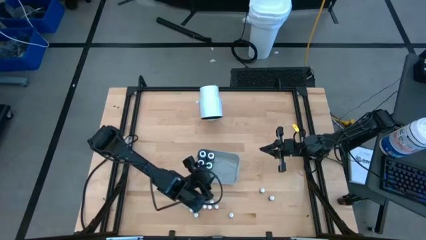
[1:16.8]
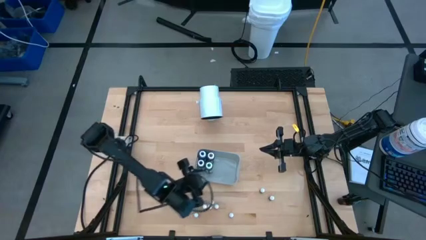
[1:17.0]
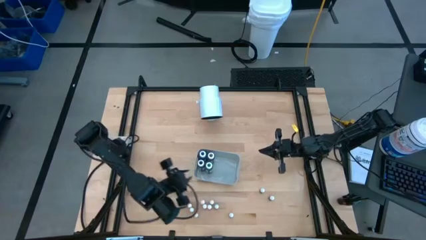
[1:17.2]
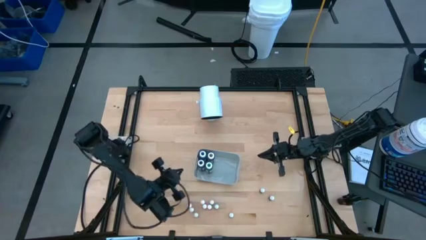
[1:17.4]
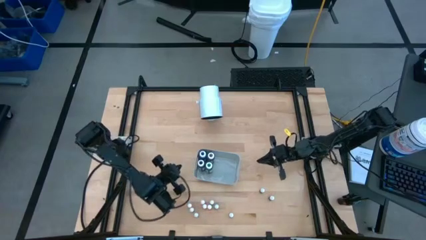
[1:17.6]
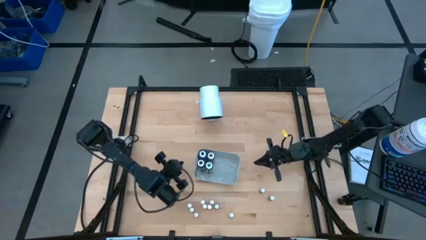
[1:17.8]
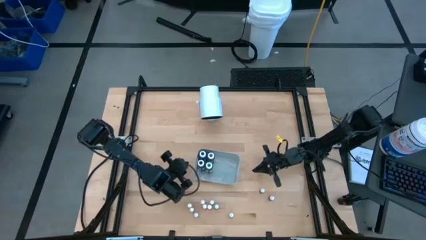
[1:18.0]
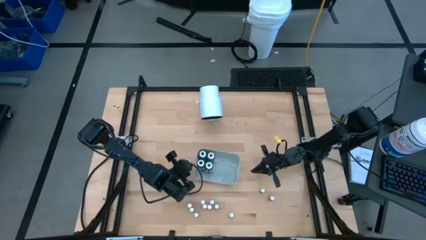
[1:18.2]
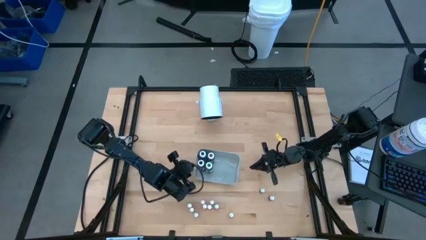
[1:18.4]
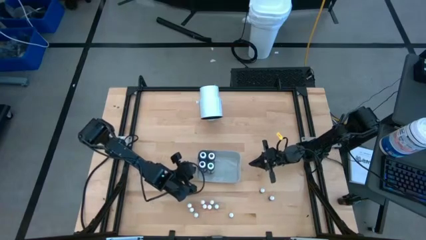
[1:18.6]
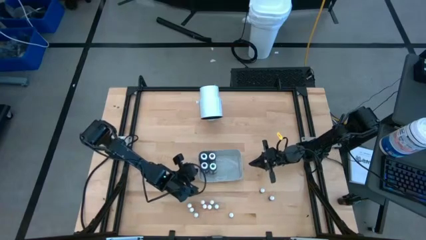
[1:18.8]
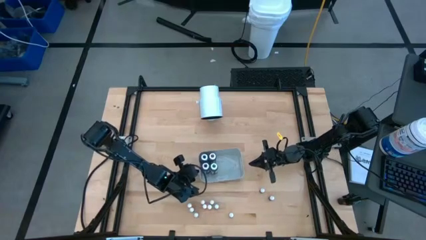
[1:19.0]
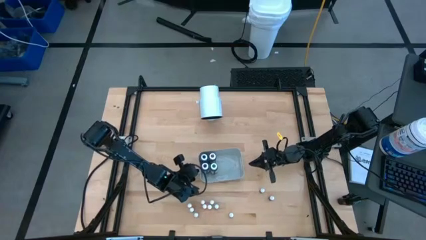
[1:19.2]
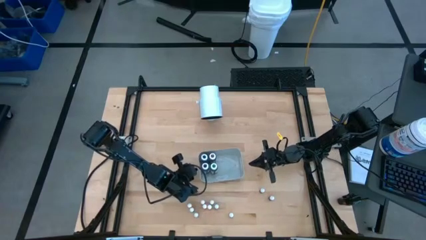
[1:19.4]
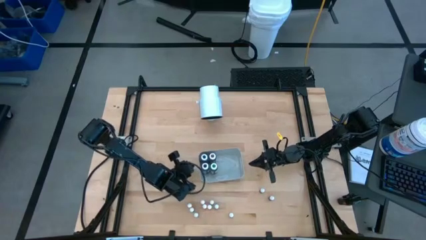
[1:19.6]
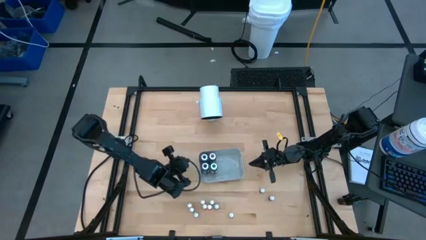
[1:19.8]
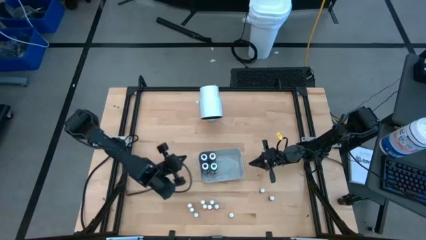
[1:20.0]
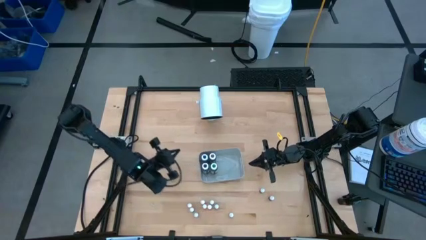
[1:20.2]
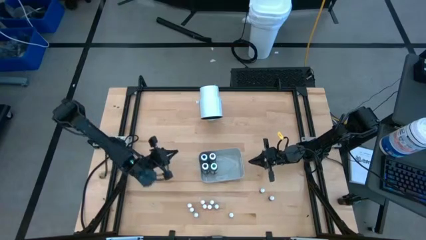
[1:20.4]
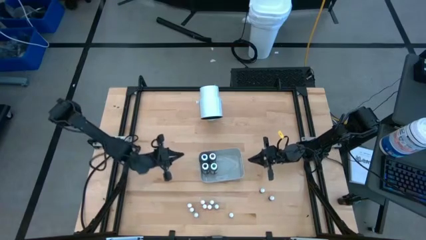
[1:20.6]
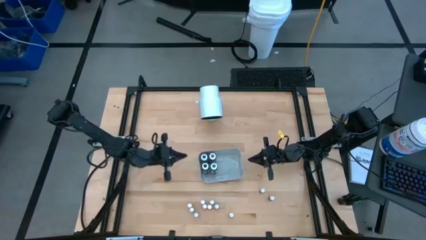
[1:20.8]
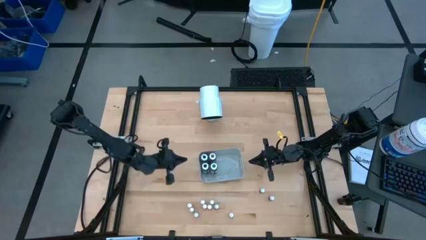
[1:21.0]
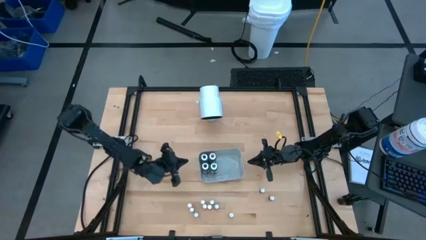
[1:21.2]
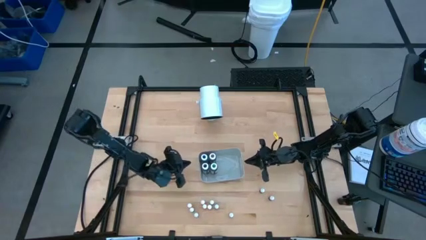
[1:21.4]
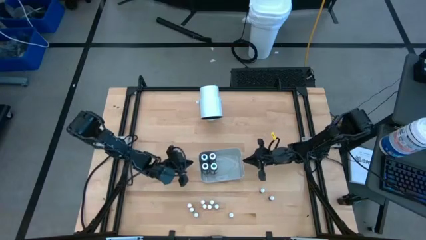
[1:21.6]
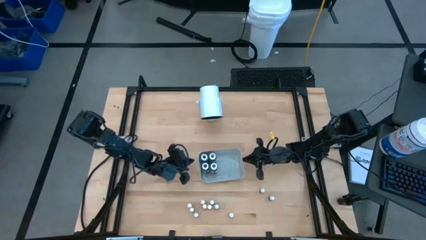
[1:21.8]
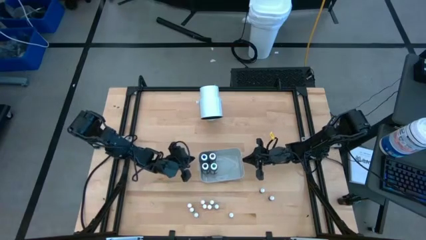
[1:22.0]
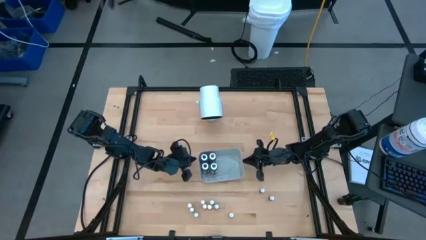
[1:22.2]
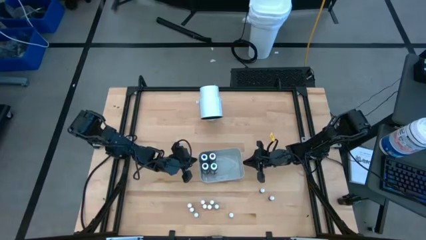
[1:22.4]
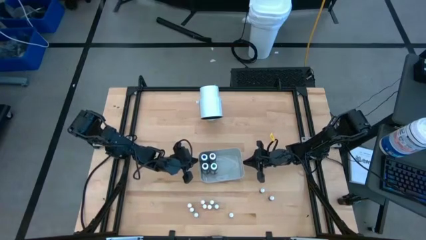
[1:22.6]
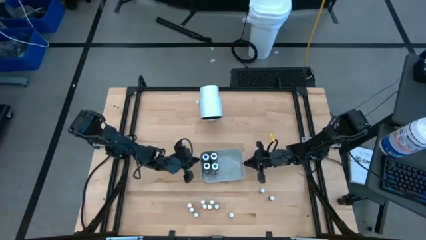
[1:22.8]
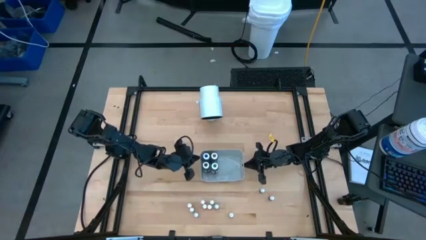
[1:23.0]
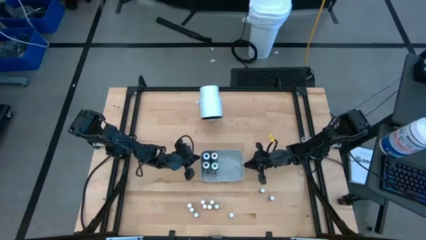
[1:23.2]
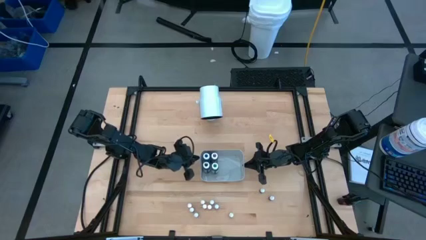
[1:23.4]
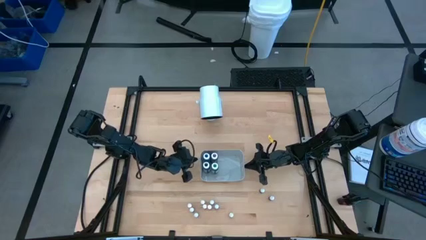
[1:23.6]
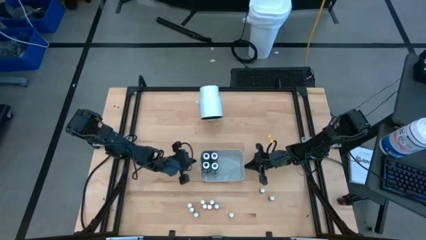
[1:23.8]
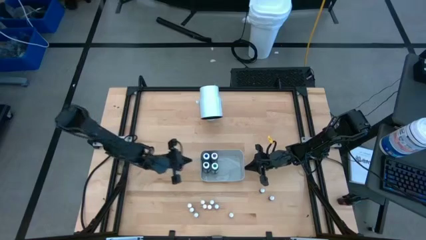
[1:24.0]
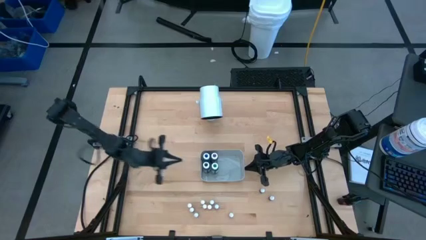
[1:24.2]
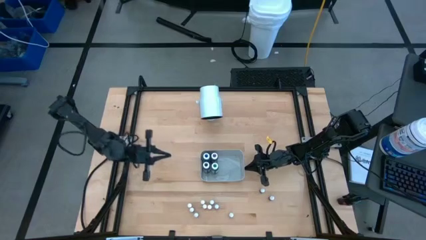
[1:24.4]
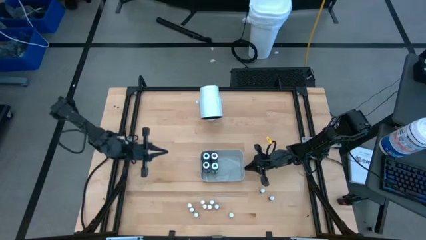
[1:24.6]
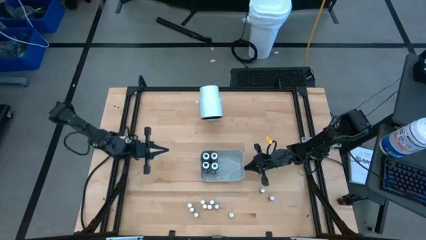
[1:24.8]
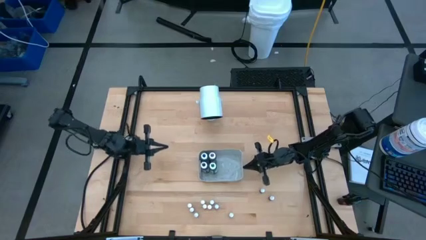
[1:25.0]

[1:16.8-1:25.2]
Task: Pick & Place food coloring
Adjust the gray bin

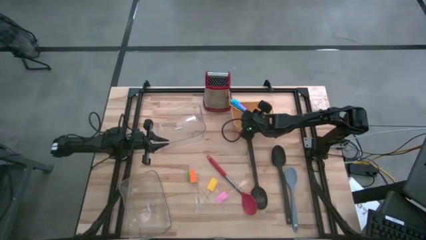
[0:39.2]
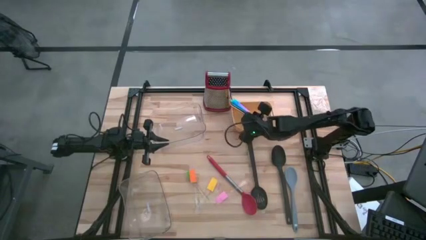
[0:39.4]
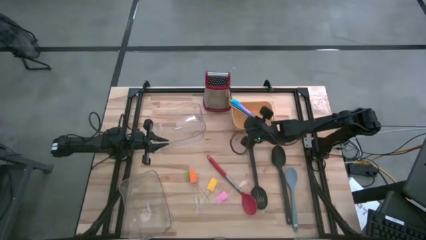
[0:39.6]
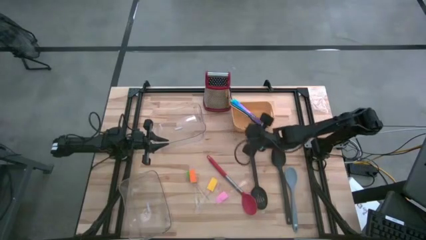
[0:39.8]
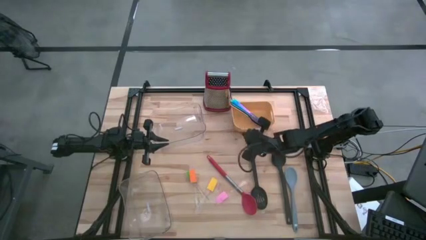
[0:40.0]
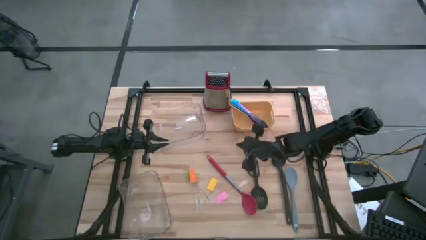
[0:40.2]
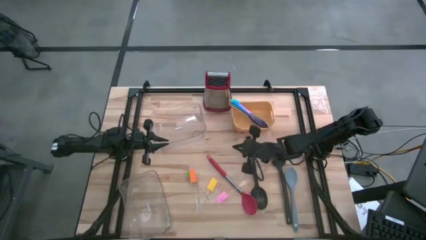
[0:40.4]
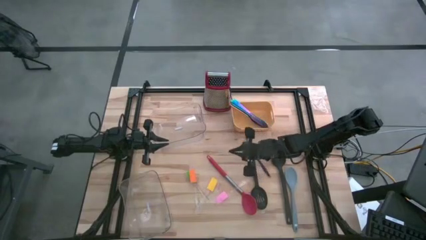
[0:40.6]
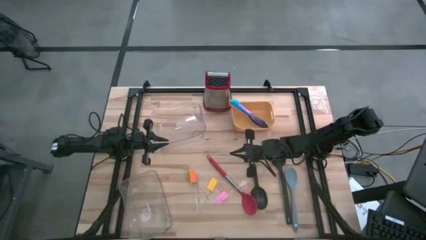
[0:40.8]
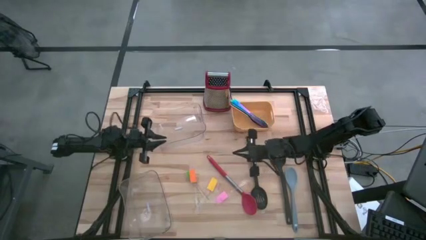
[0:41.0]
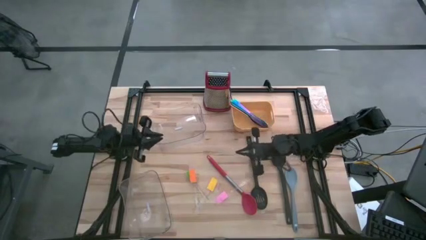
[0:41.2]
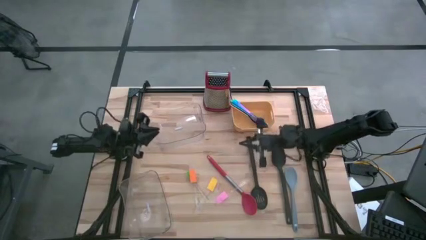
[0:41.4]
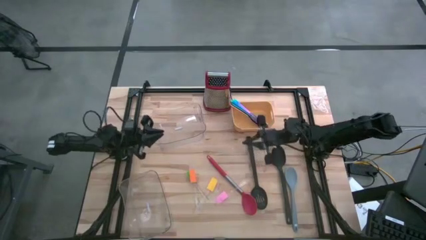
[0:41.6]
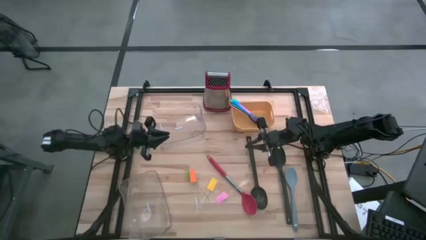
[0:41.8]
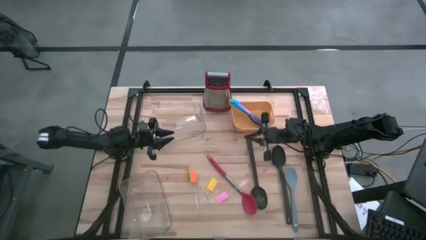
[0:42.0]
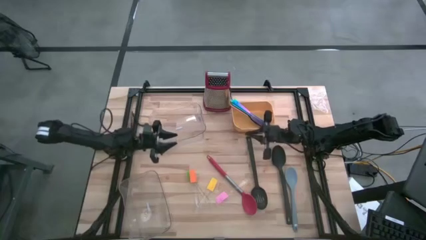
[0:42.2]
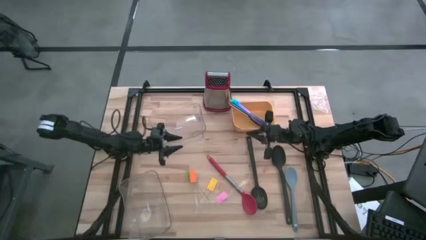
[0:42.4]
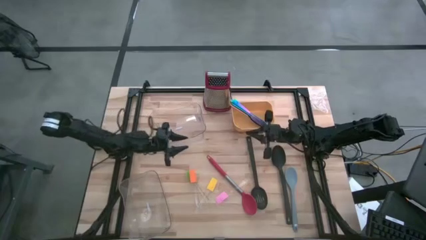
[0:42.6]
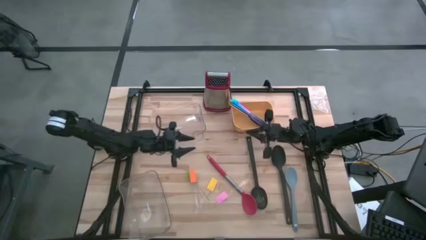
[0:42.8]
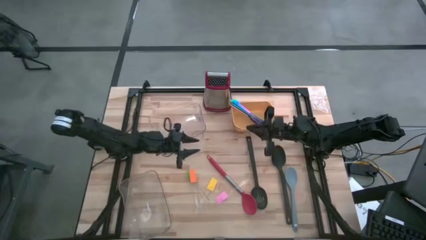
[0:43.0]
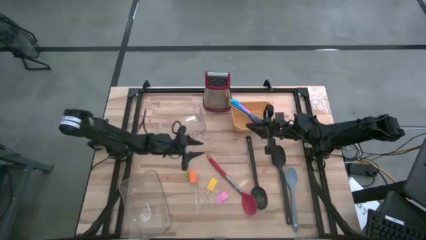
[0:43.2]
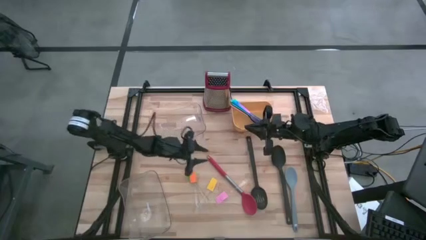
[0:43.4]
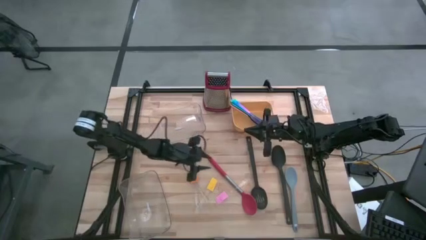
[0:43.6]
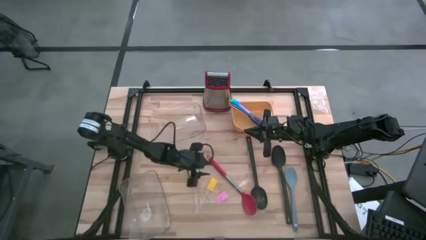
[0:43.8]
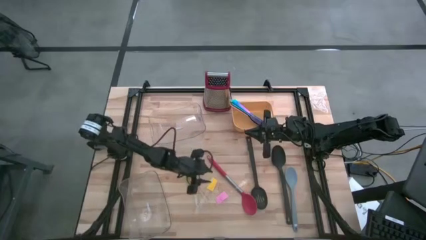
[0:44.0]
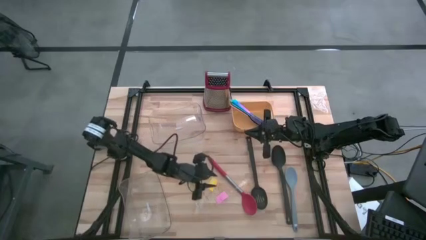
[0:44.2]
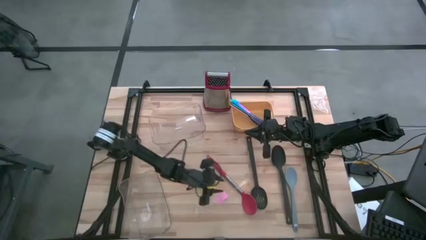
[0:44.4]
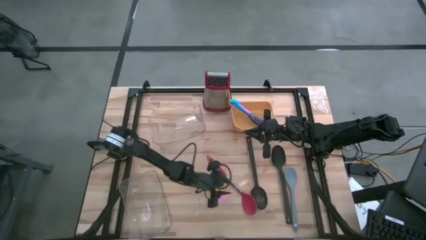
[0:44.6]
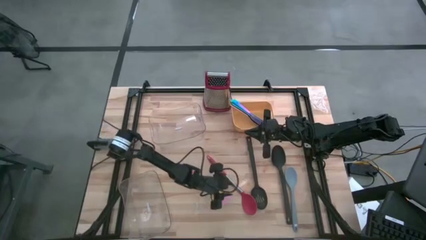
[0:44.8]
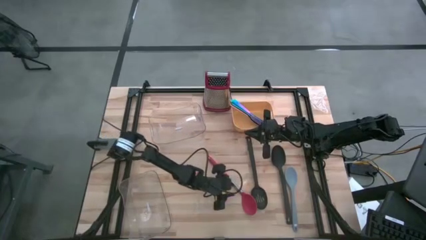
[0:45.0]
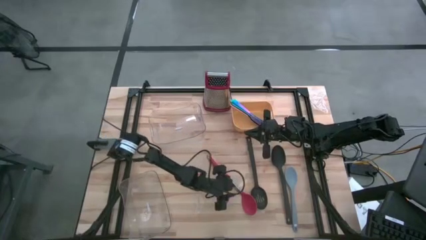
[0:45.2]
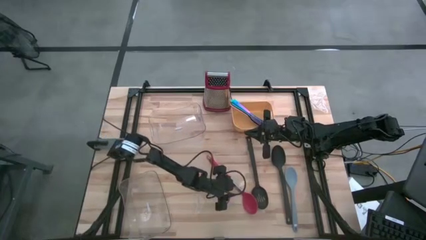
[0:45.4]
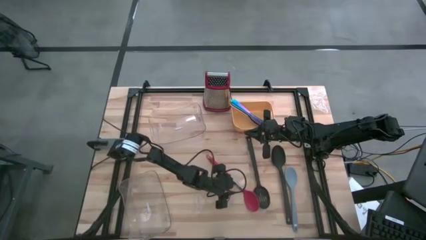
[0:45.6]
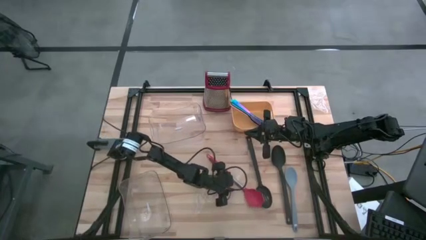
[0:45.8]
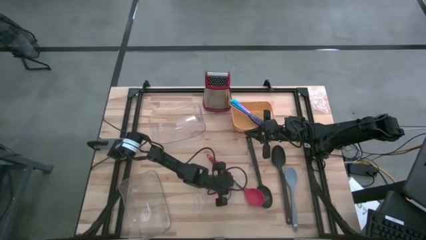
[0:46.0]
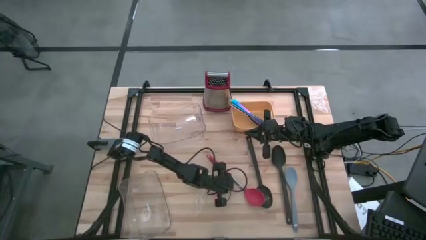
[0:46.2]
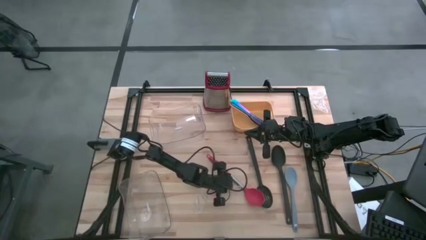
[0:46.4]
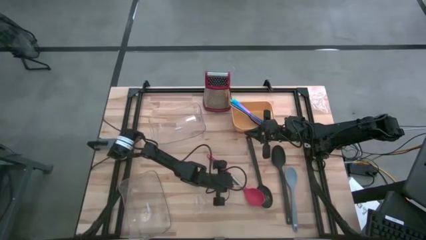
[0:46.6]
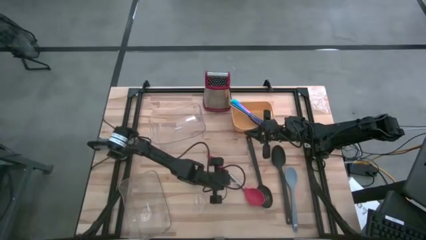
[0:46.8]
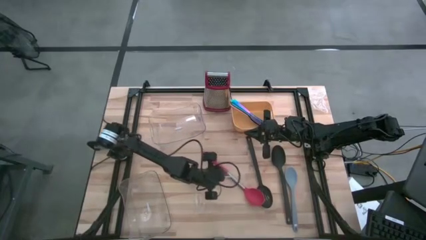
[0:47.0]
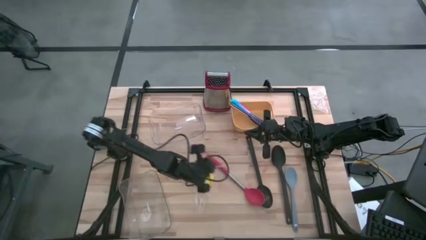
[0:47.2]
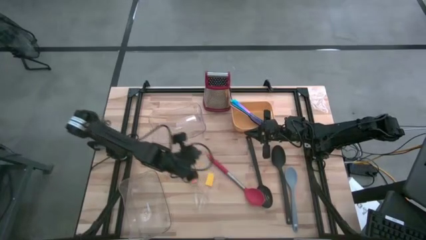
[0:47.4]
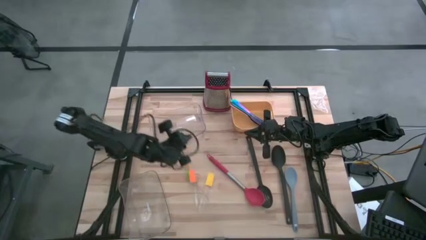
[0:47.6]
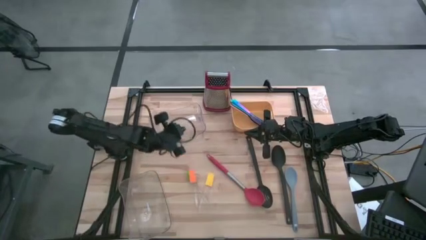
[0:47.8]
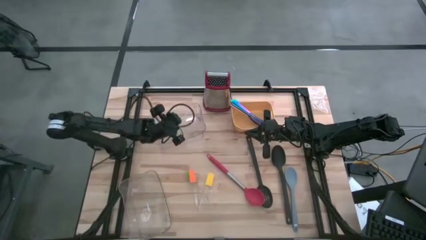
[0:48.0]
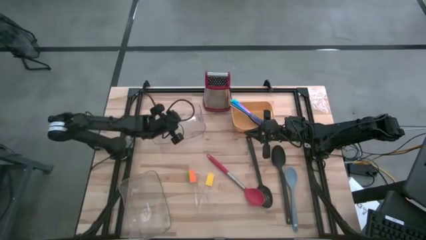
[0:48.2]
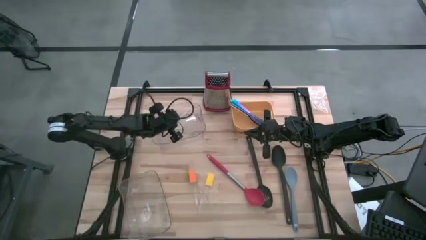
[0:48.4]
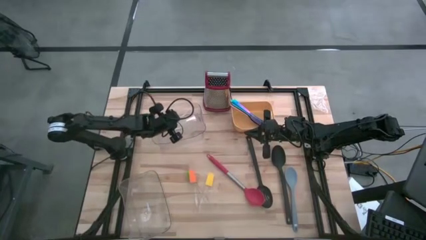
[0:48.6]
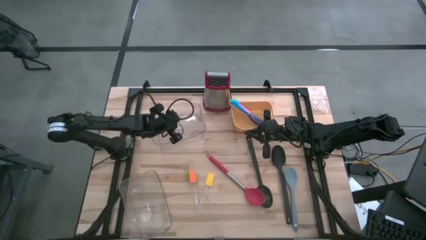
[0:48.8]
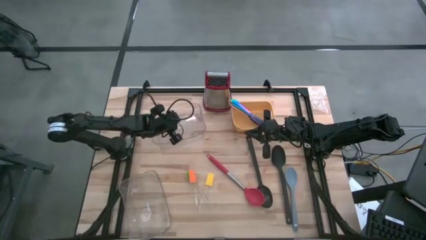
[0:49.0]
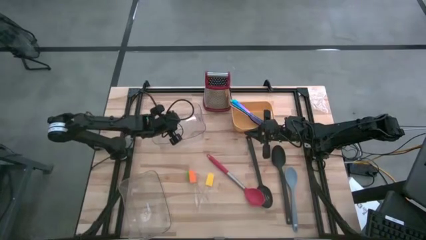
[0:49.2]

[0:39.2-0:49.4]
Task: Pick & Place Kitchen Items
Put the pink spatula into the top transparent bin
